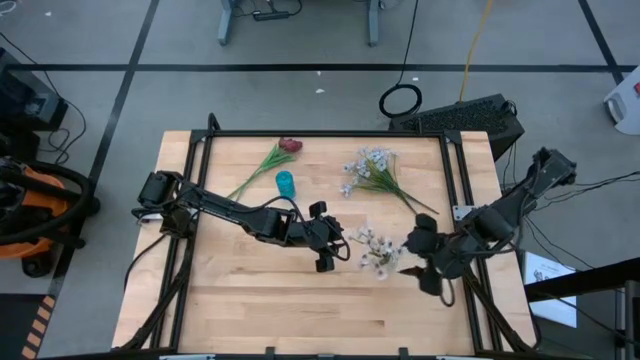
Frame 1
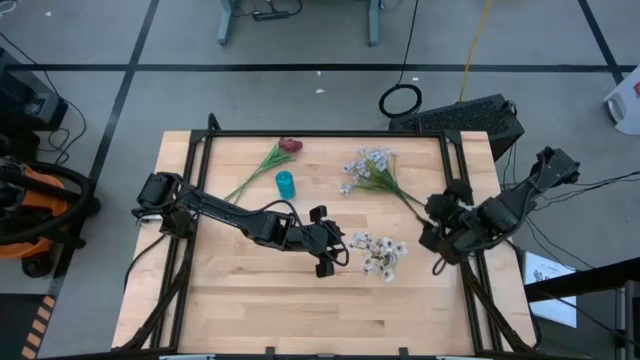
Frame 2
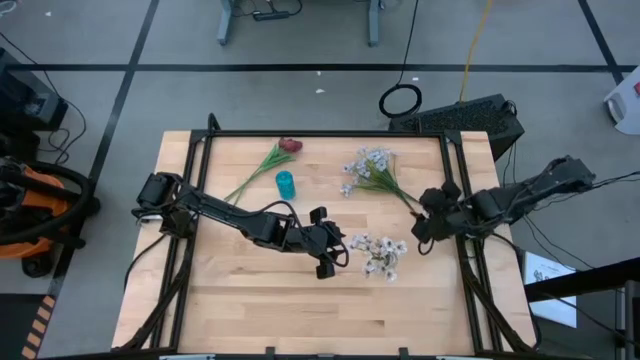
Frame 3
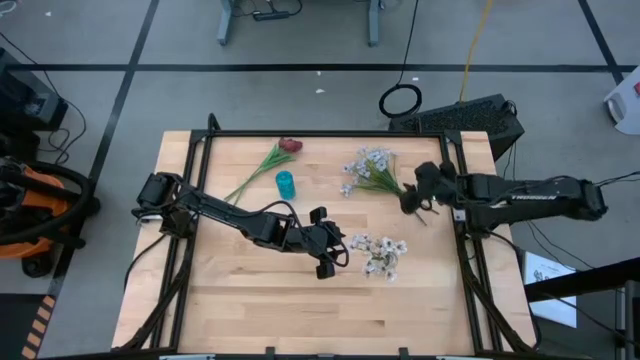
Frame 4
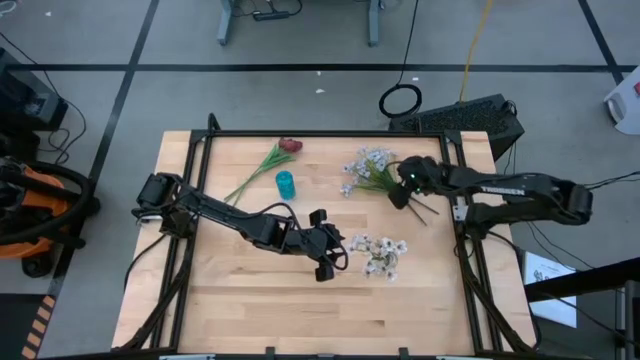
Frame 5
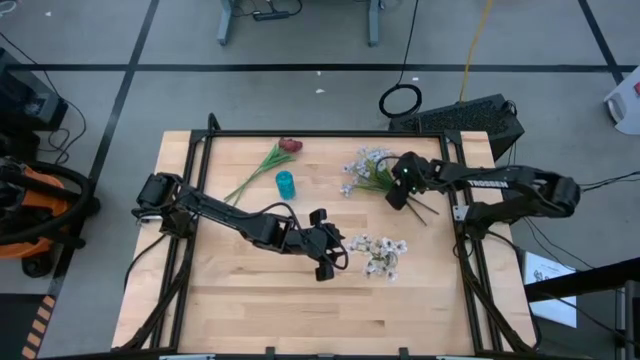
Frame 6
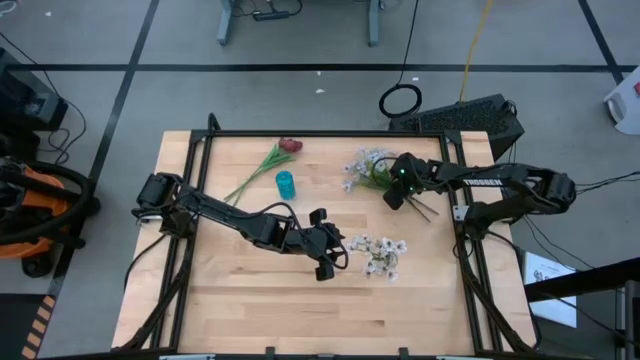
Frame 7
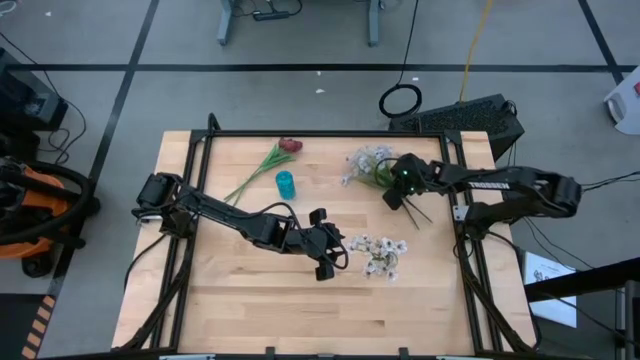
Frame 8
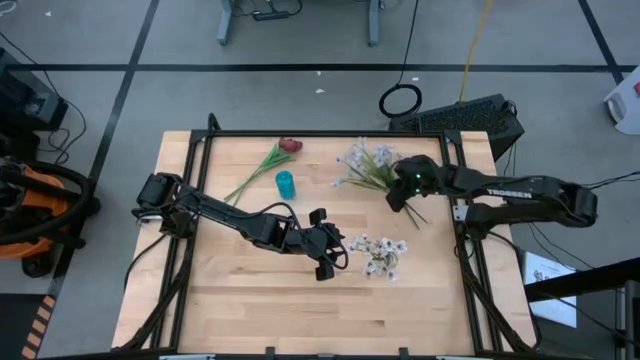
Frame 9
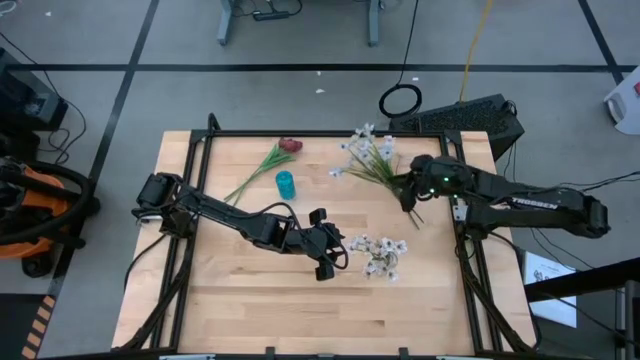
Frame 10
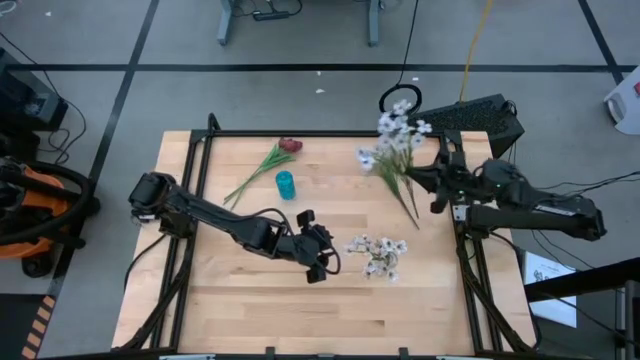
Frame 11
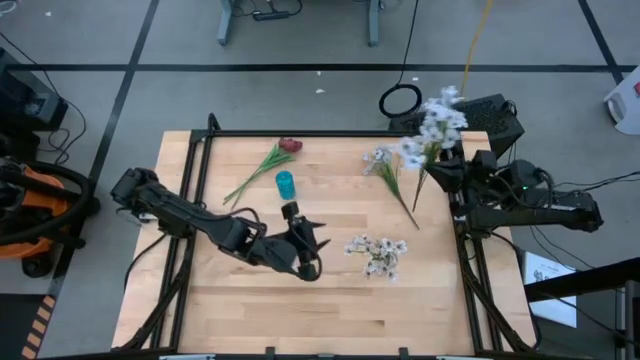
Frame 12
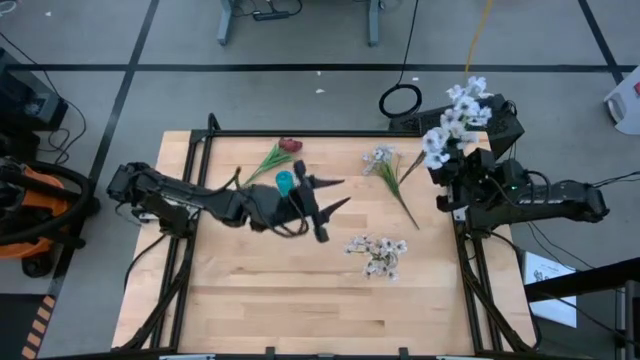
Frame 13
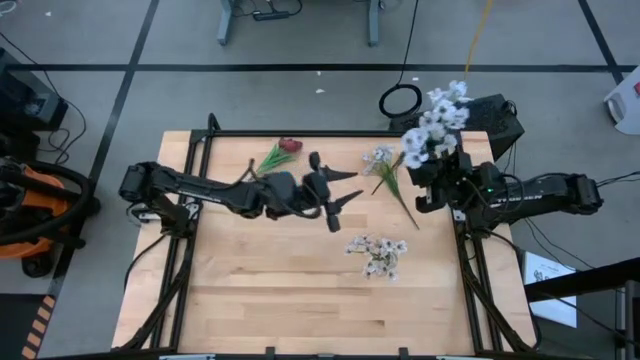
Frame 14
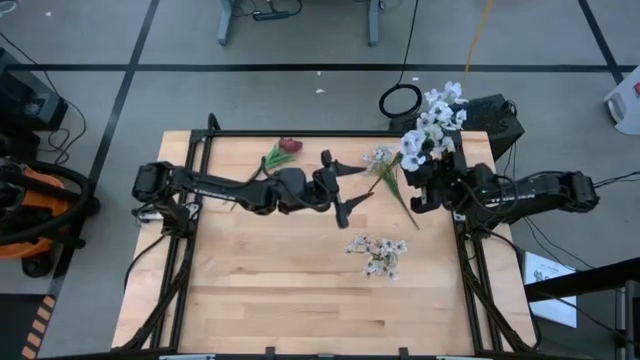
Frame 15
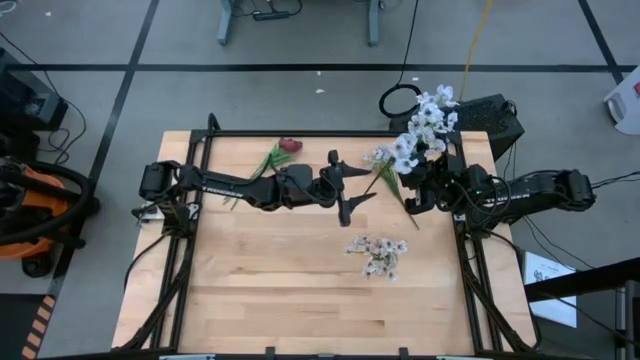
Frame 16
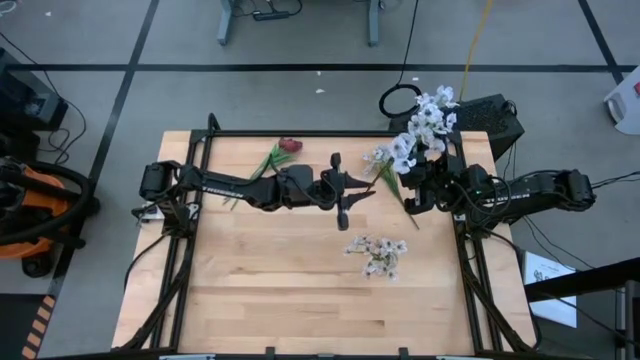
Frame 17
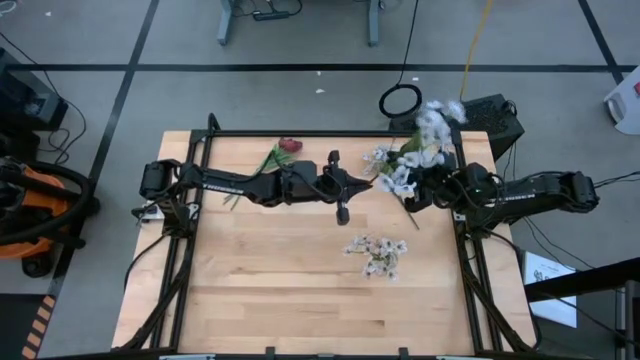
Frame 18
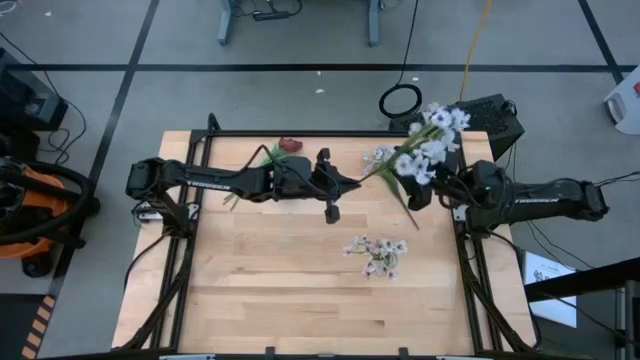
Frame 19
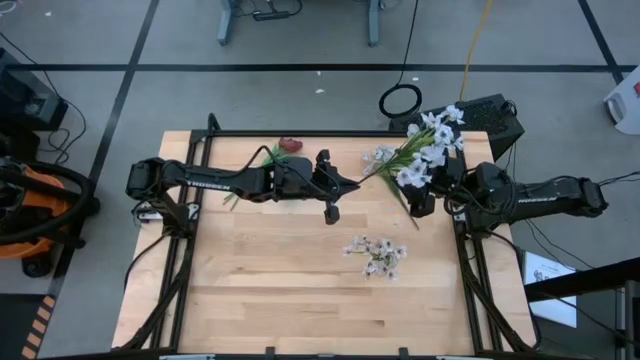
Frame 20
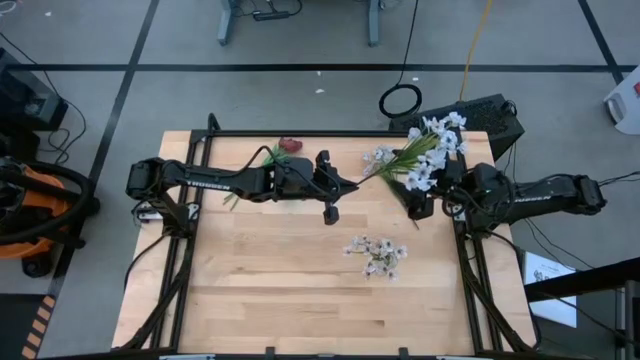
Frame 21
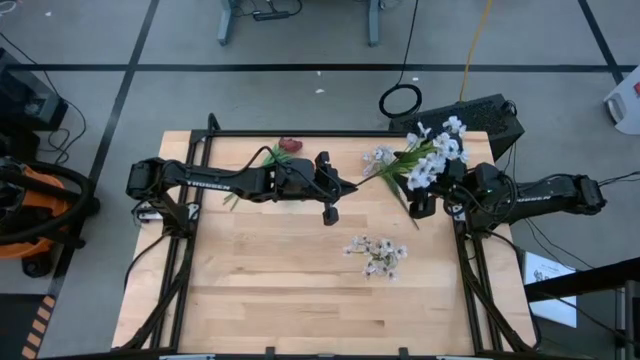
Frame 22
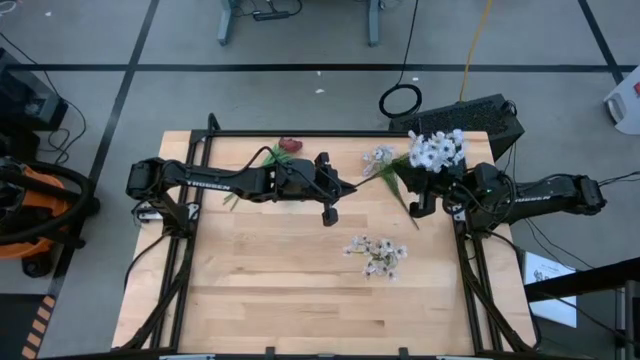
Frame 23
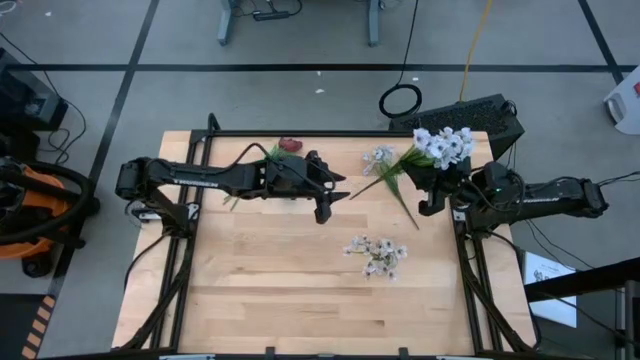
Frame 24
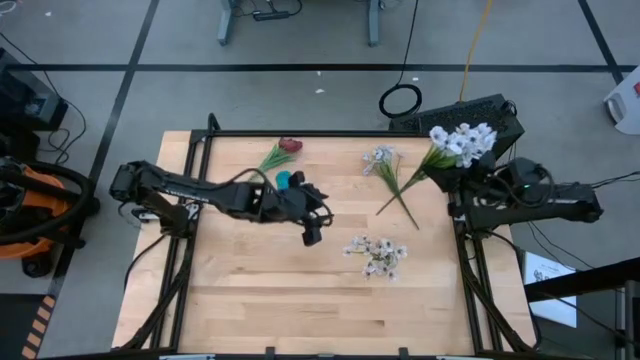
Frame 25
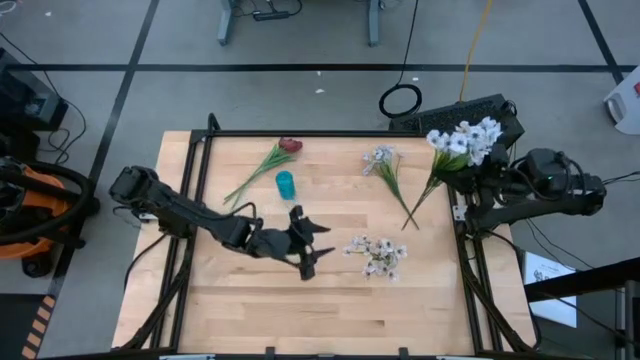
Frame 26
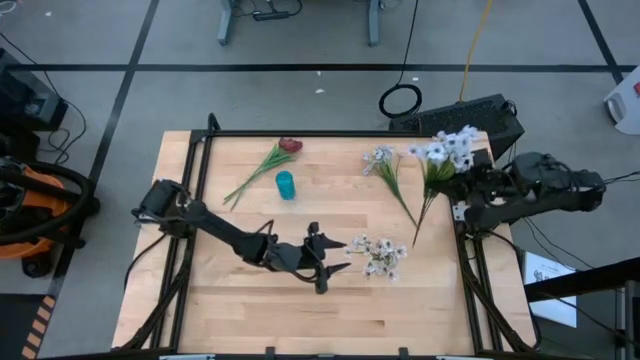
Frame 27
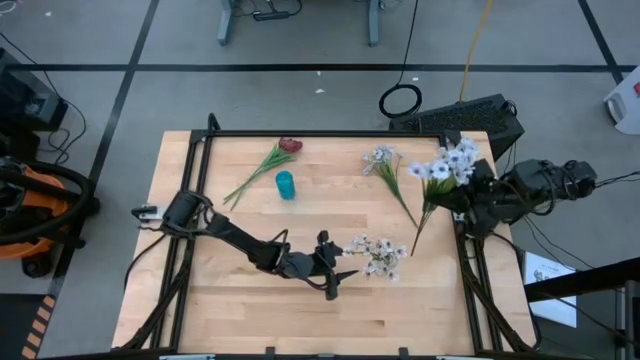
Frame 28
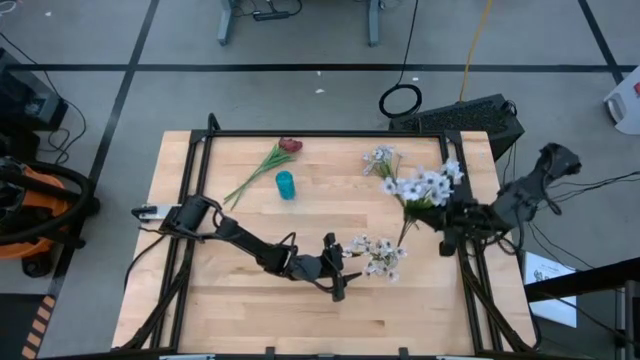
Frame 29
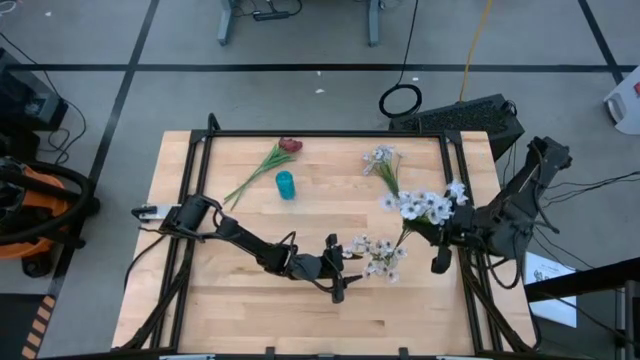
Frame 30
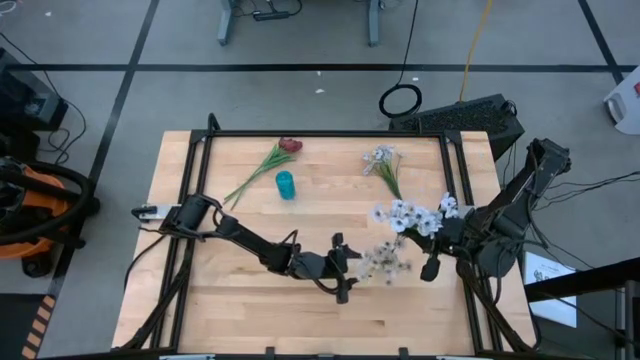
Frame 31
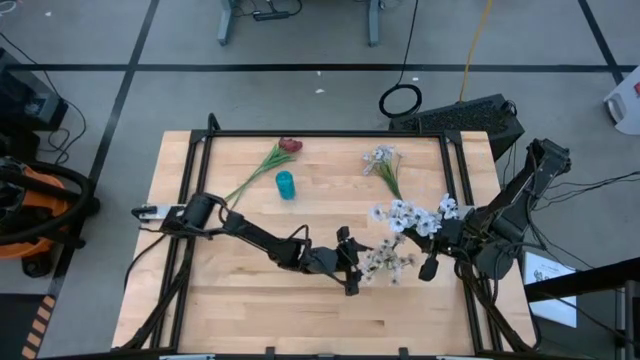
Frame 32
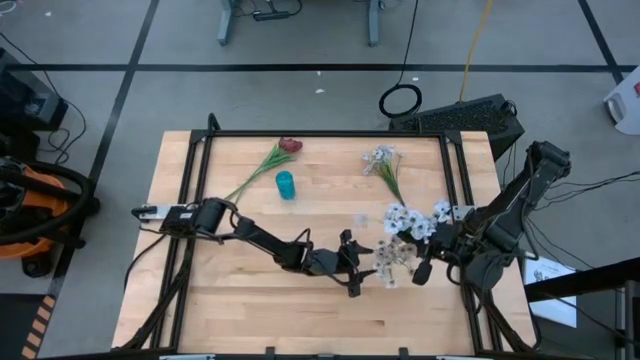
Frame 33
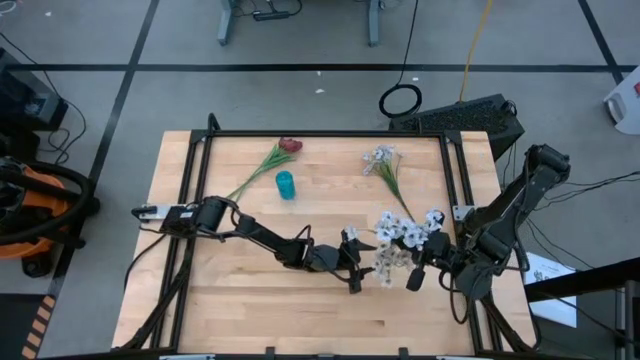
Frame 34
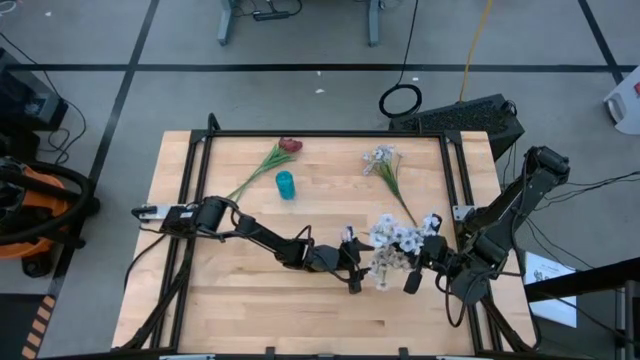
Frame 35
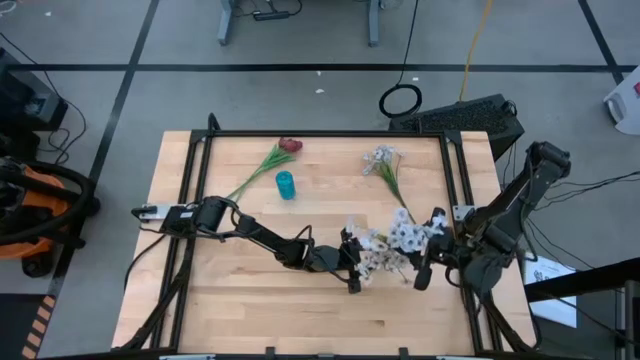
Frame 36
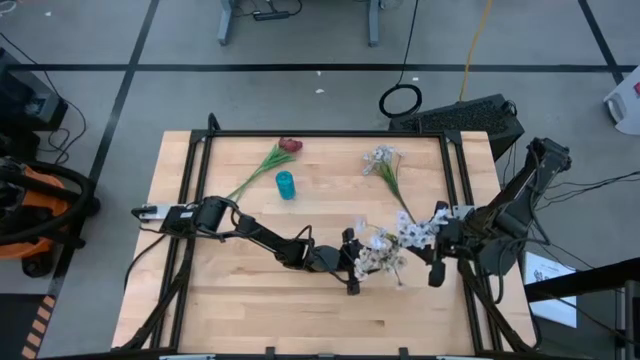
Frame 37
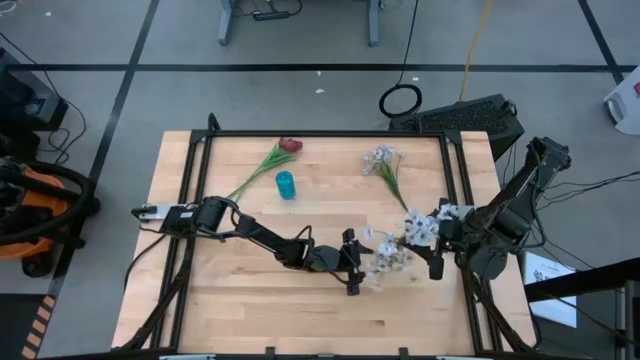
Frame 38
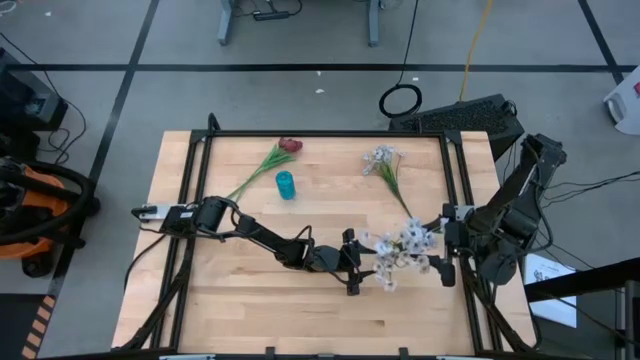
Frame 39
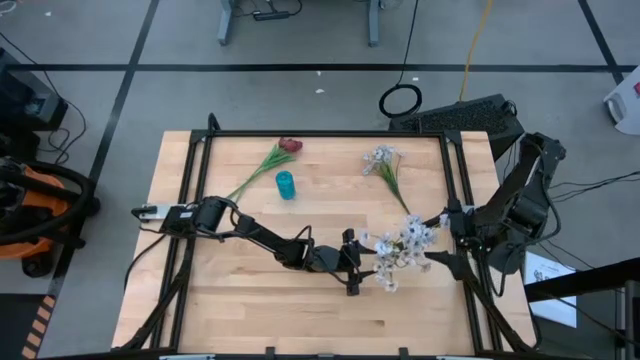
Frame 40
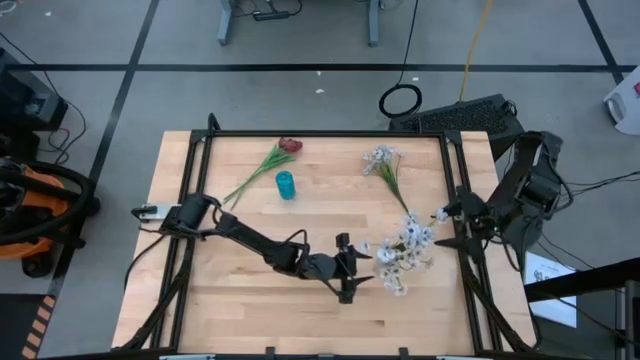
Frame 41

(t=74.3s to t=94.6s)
Task: Sort flowers into vase by color
Put the white flowers into the transparent vase
